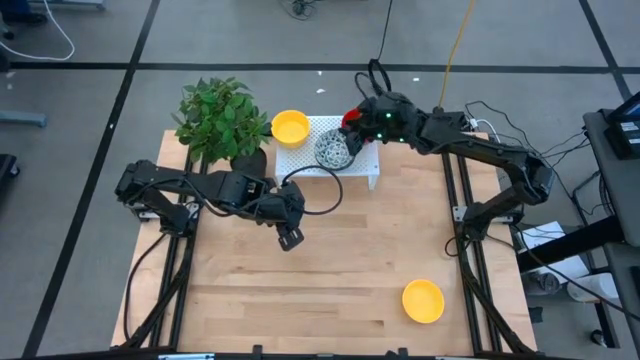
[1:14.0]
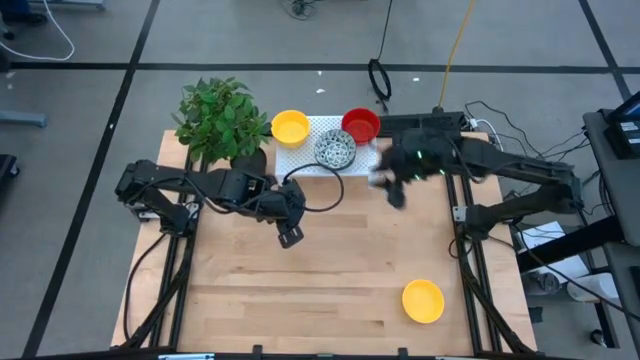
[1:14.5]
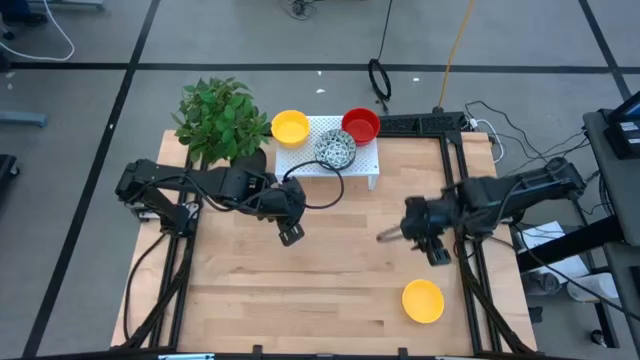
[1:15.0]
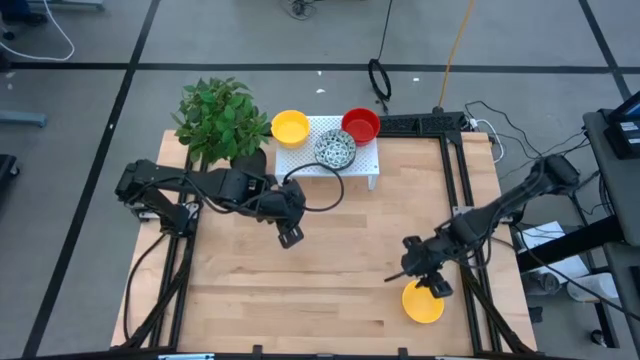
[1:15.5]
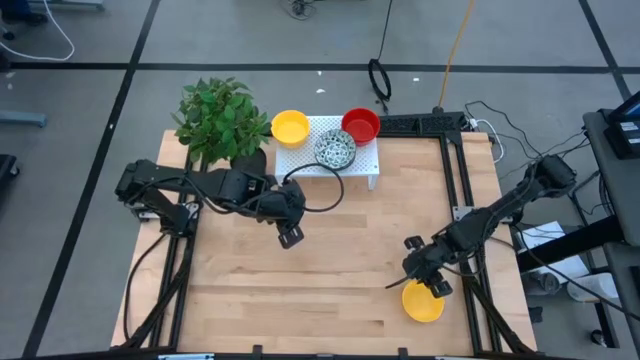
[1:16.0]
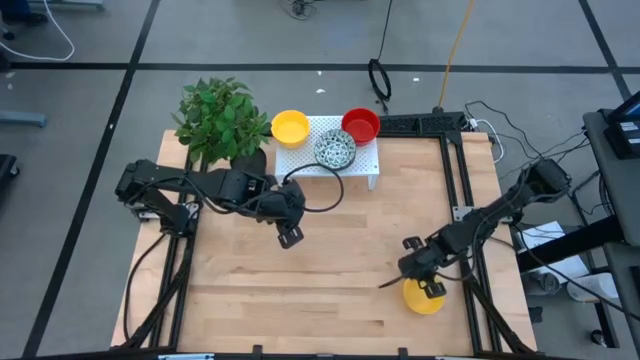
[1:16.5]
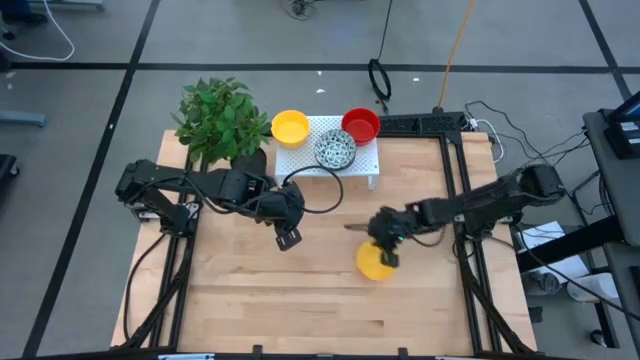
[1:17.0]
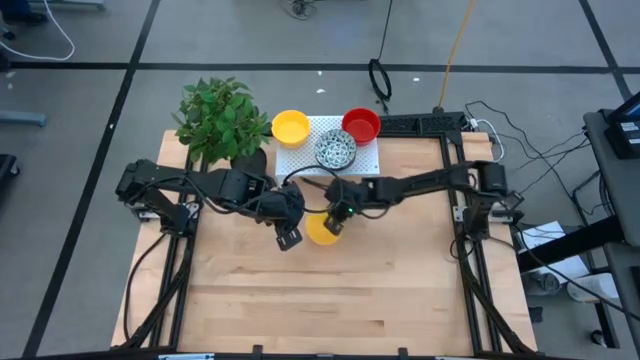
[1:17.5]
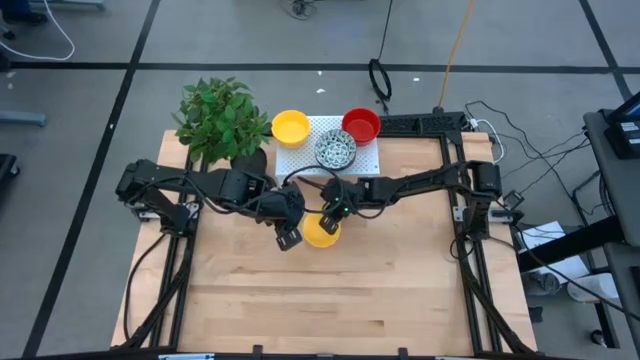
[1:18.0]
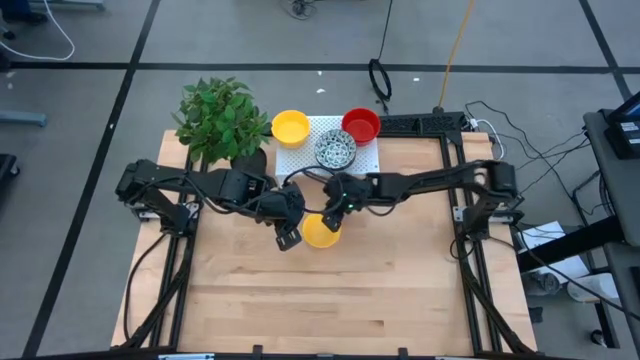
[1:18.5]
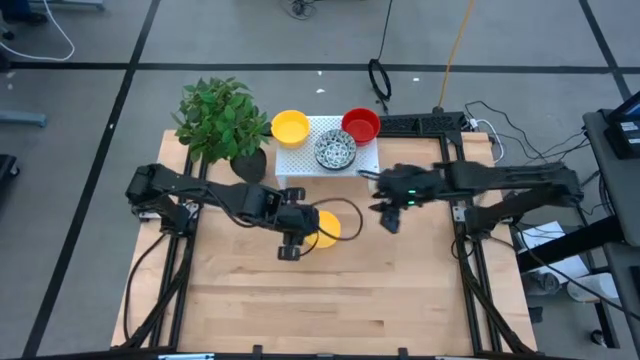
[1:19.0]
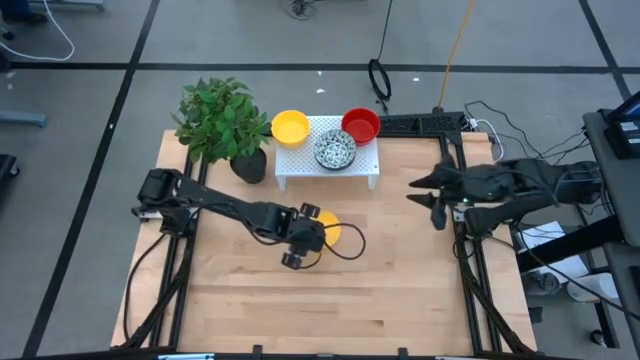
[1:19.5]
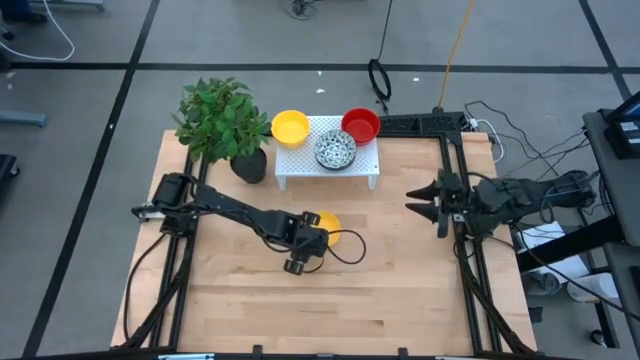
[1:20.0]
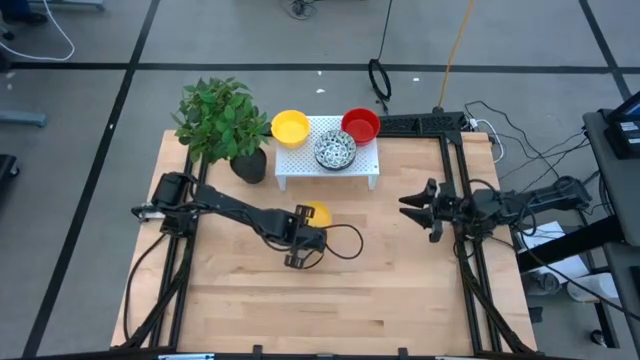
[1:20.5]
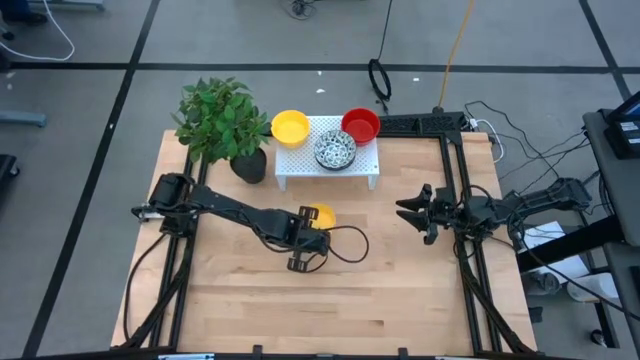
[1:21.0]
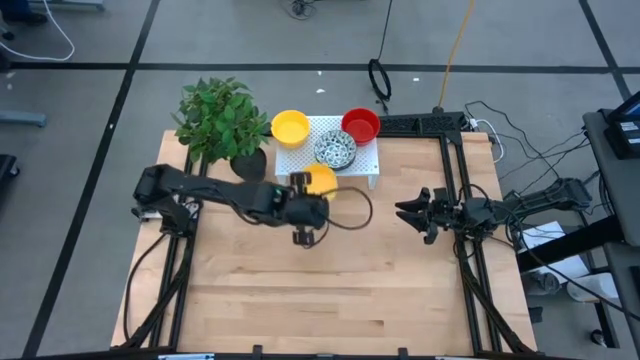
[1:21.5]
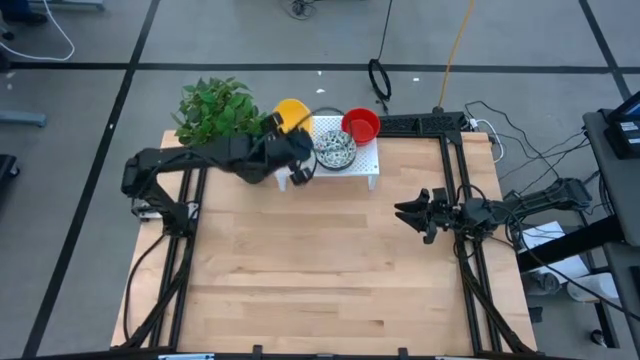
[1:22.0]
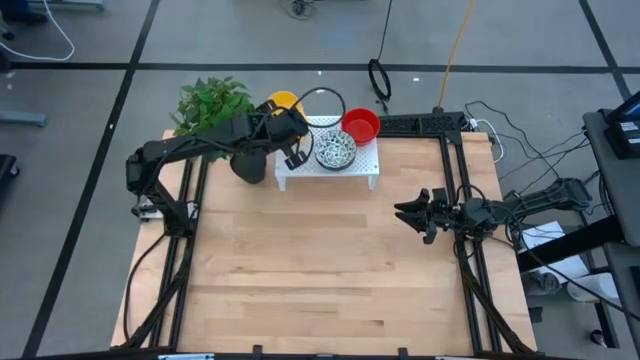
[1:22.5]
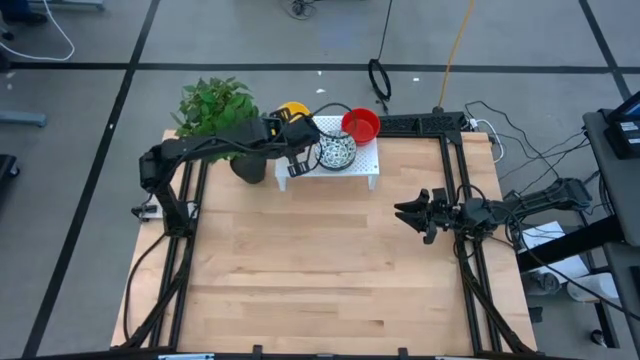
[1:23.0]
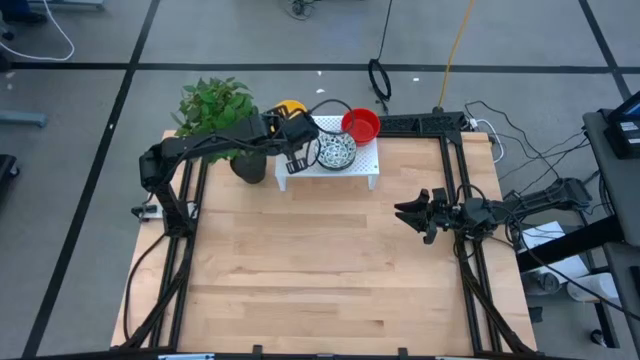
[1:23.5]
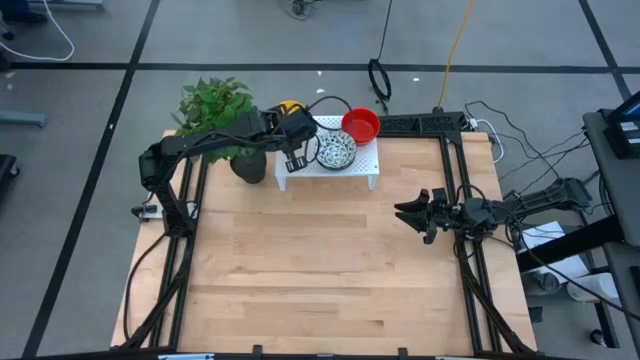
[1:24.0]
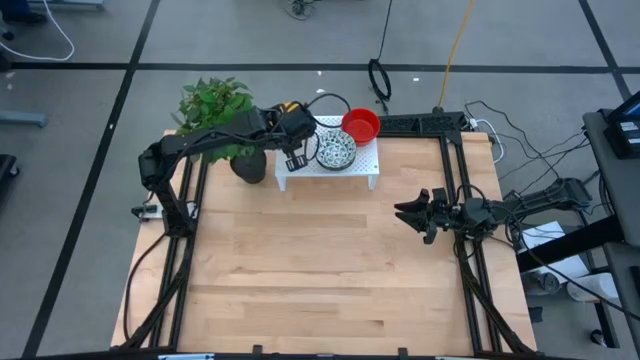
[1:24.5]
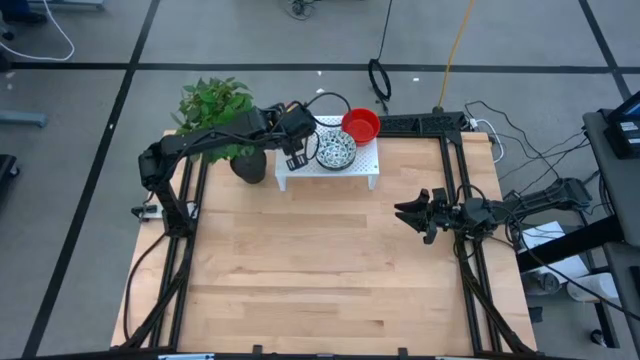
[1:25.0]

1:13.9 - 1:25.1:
Task: Pick & Place Mini bowls
Stack the yellow bowl on the yellow bowl on the shelf

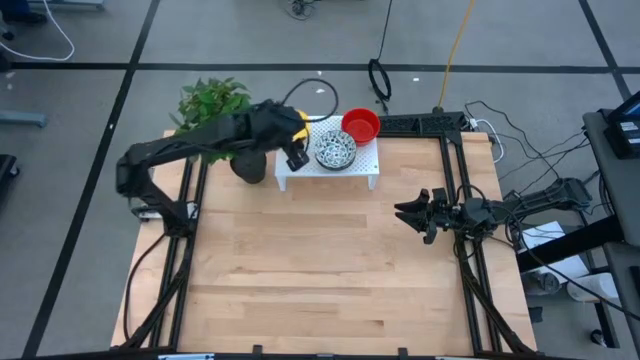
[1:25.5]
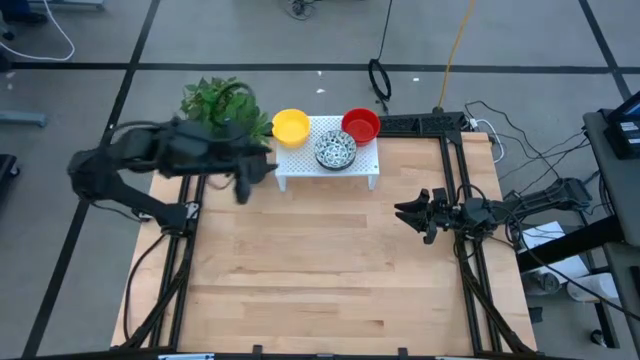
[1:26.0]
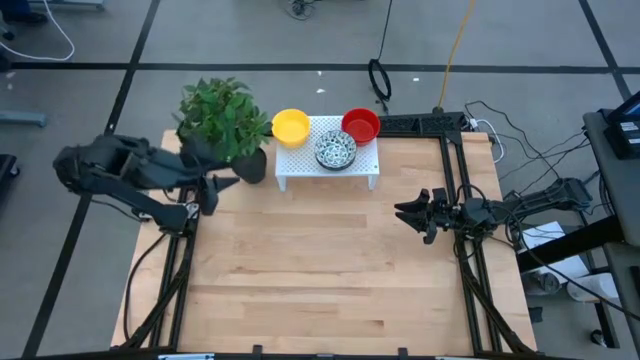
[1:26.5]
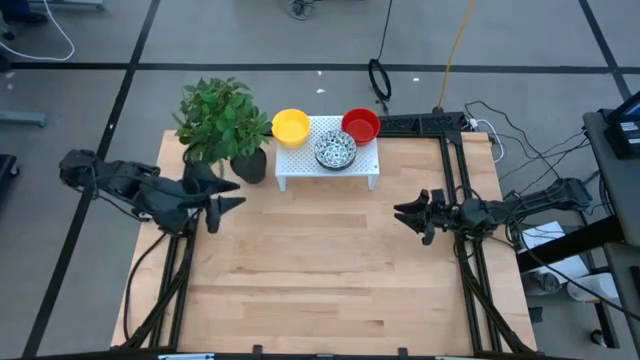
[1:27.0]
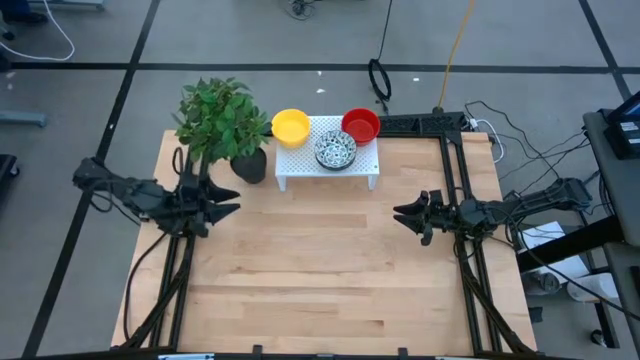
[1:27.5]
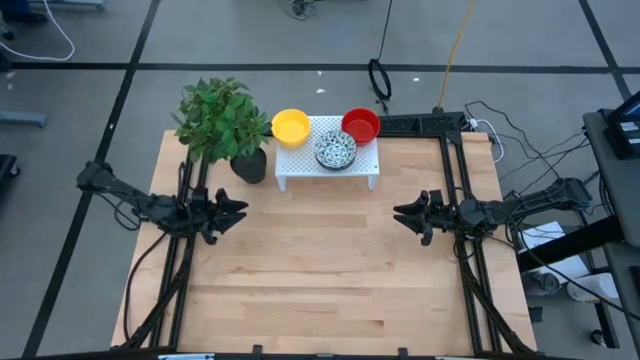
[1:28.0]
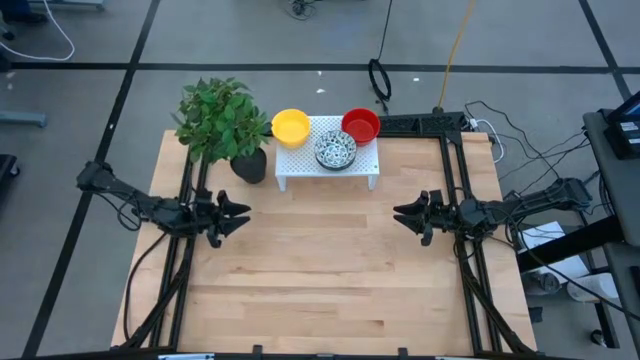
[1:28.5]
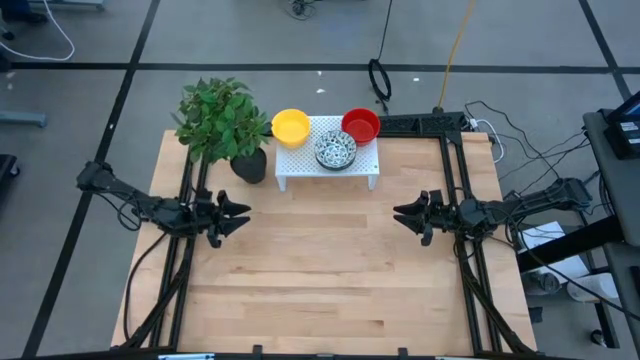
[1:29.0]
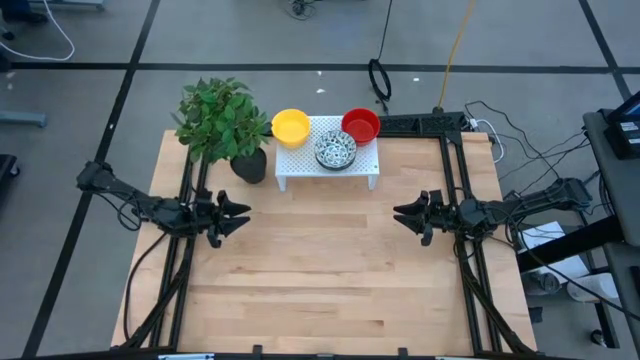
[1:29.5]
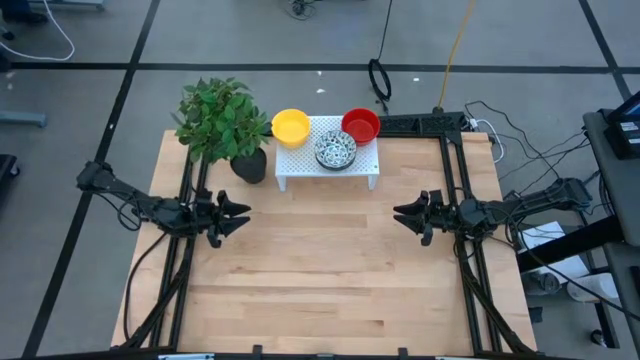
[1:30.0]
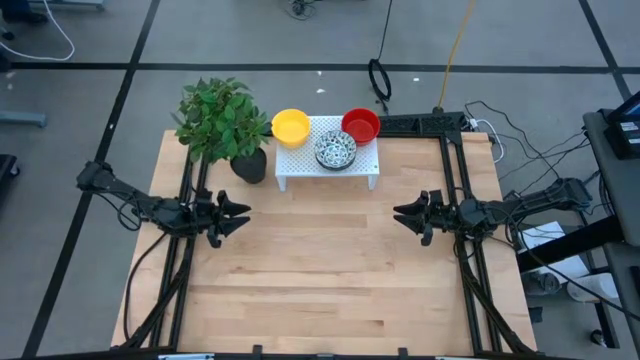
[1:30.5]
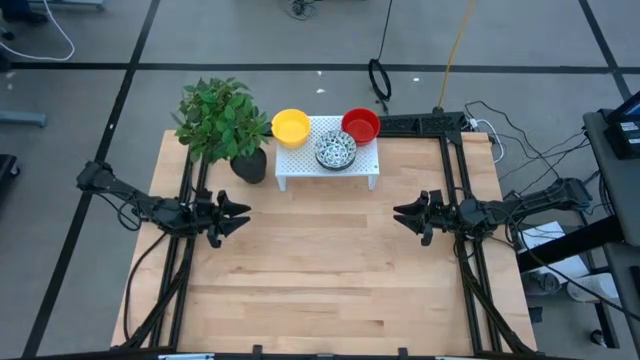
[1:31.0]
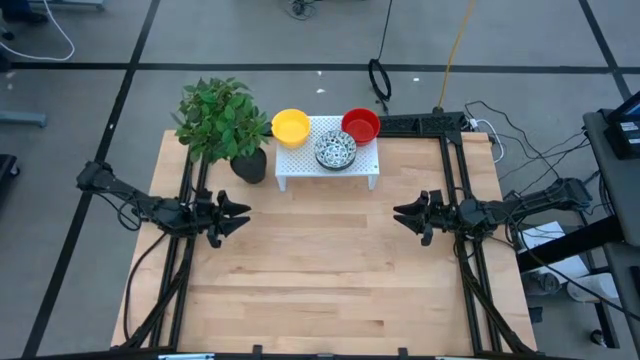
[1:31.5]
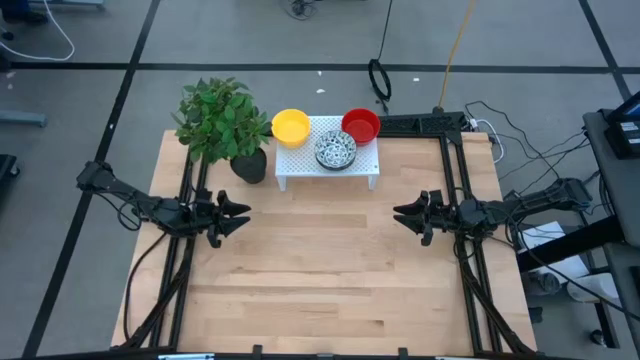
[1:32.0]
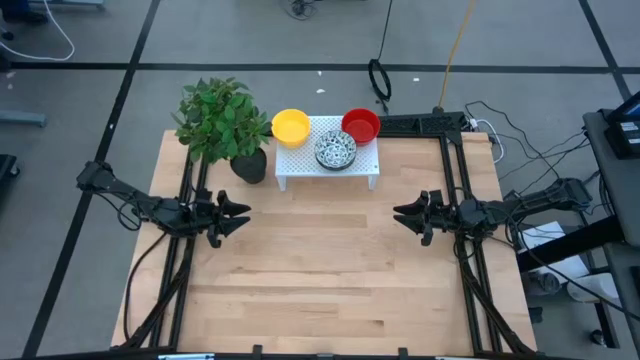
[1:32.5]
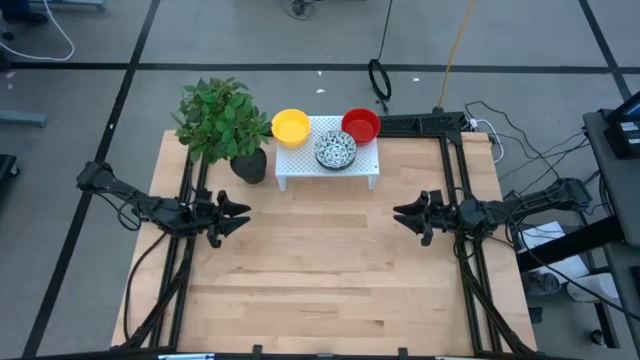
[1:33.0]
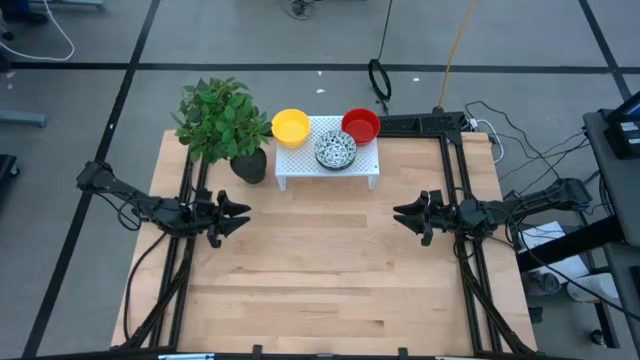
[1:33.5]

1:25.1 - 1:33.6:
Return to Home Position
